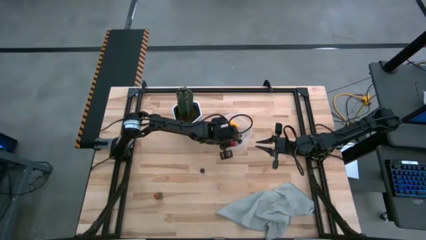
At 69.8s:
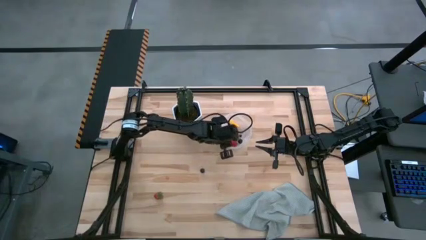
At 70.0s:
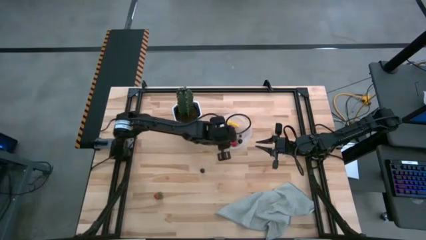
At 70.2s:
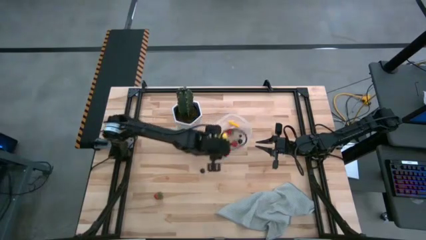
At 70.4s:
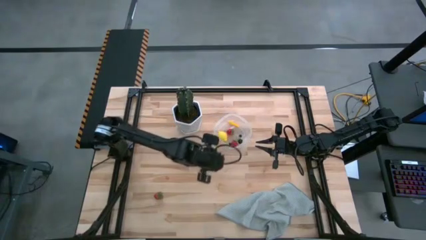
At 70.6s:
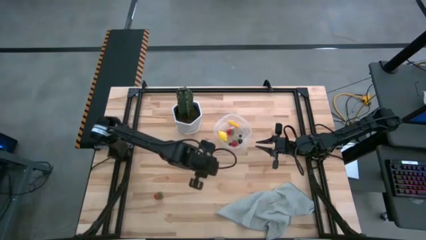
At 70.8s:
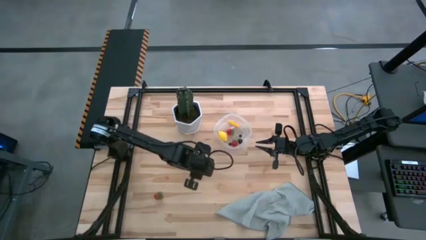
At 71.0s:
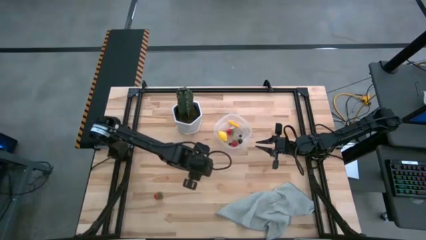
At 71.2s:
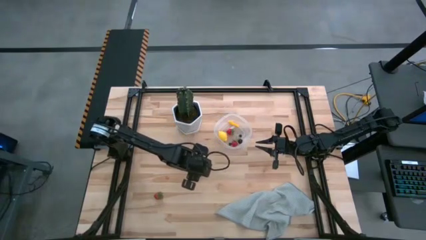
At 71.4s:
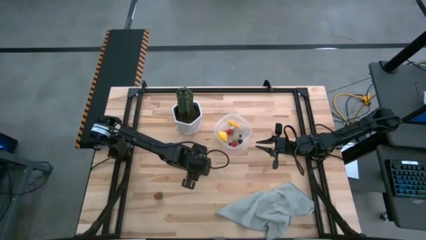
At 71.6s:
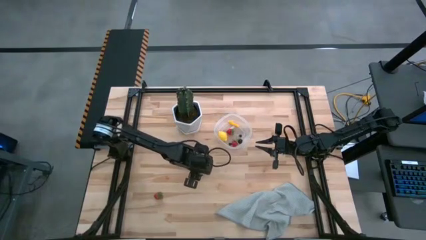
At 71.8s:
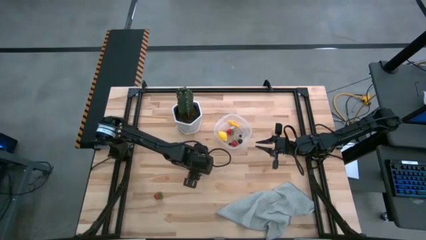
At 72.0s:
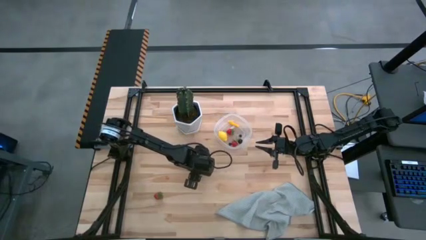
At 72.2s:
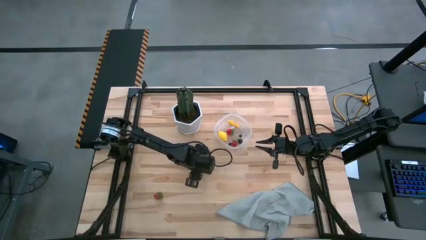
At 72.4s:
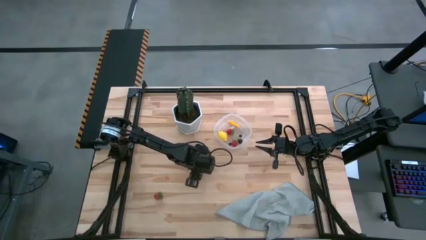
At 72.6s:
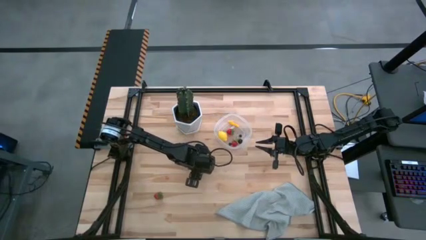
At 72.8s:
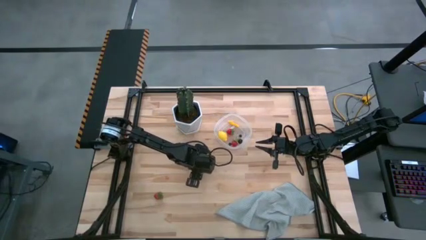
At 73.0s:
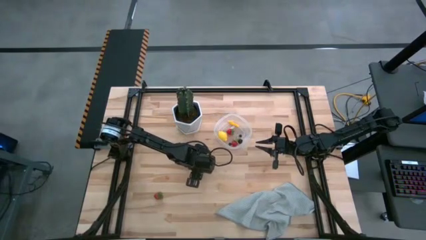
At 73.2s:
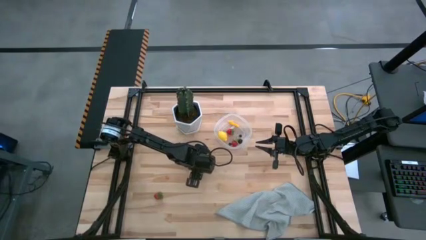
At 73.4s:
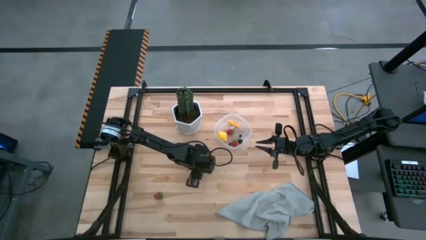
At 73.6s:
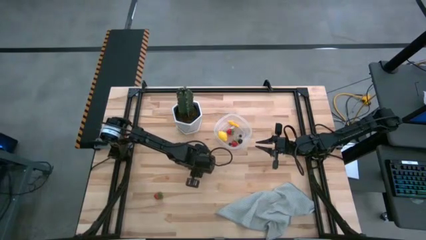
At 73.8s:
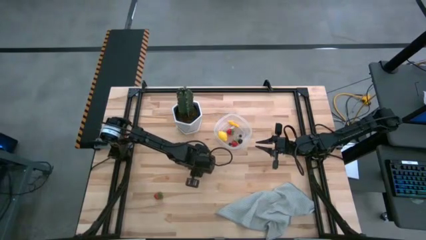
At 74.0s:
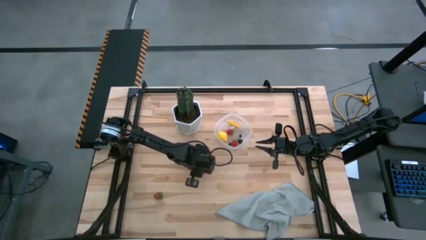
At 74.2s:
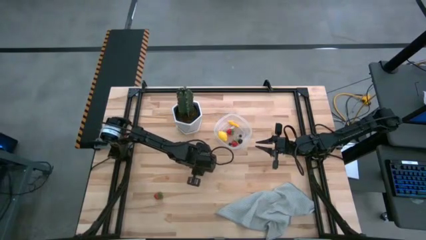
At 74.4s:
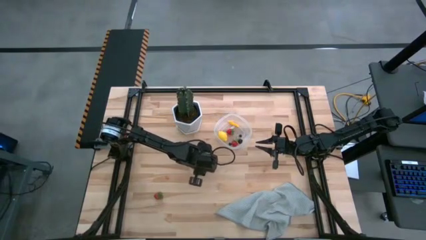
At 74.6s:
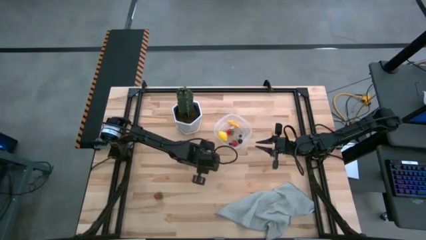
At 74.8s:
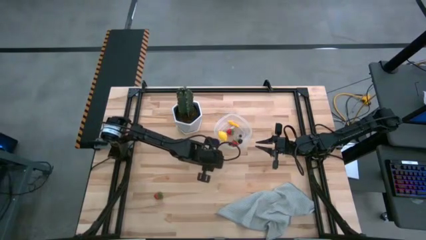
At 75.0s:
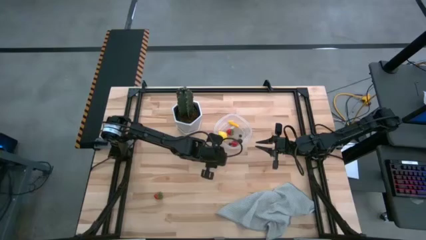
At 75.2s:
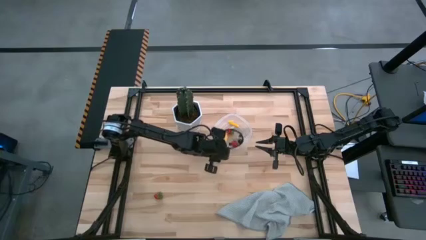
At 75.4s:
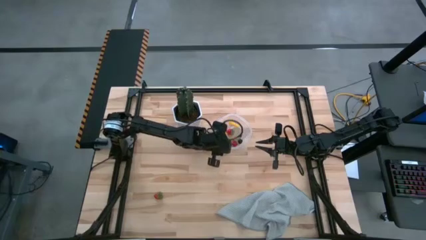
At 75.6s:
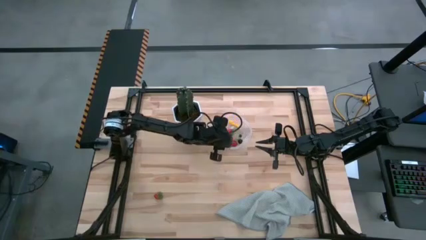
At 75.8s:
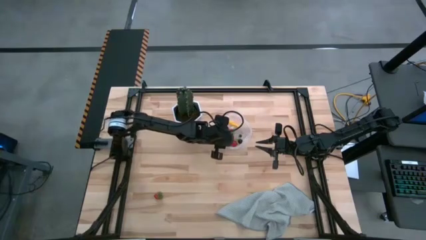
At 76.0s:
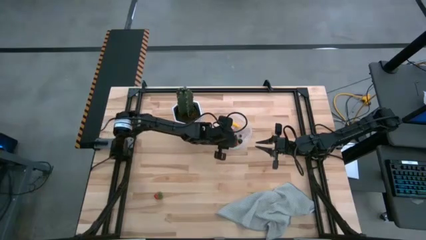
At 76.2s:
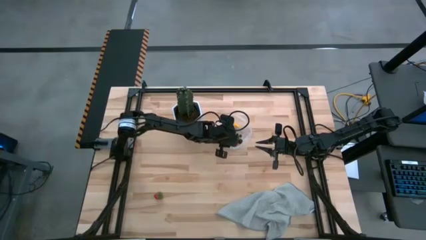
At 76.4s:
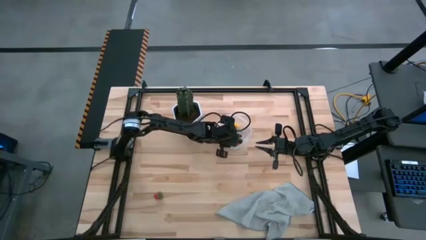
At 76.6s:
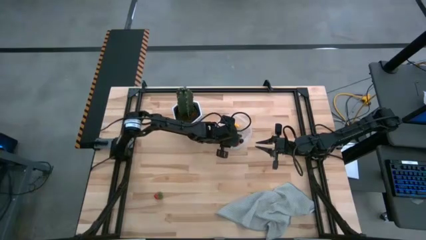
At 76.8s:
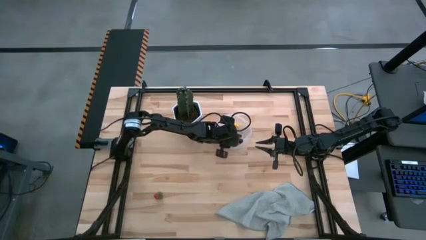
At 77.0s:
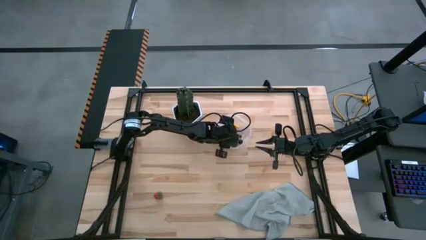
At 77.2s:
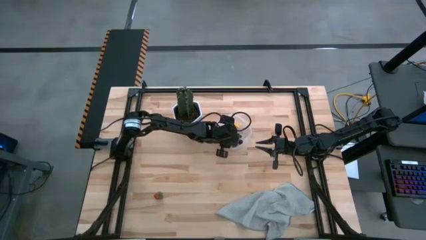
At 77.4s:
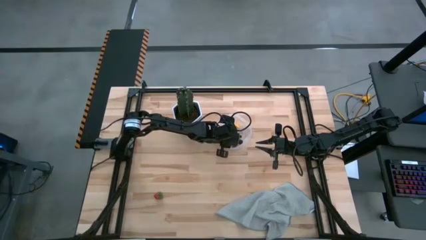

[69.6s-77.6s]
Task: Pick and placing Produce into tupperware
Put the blackberry into the transparent container

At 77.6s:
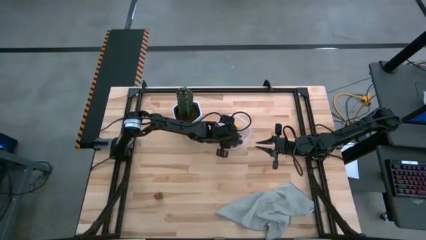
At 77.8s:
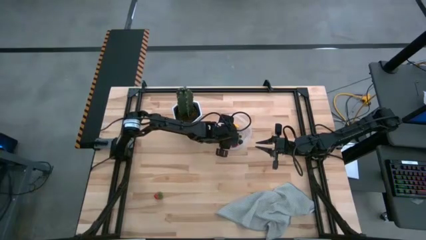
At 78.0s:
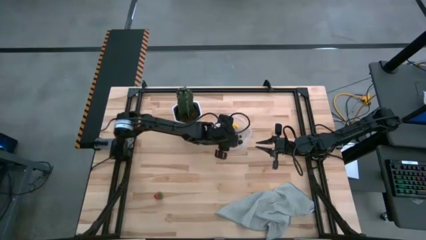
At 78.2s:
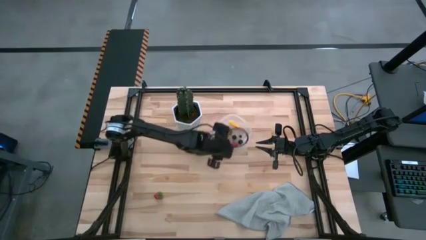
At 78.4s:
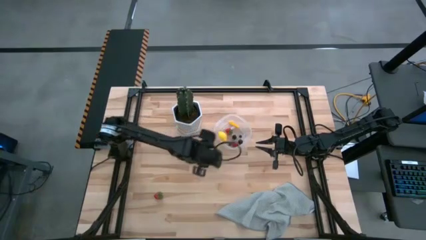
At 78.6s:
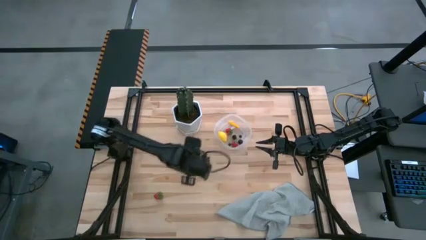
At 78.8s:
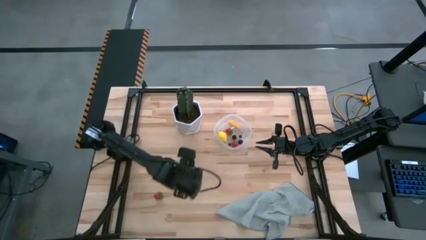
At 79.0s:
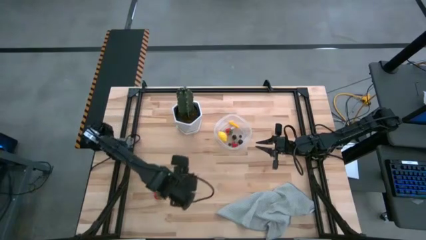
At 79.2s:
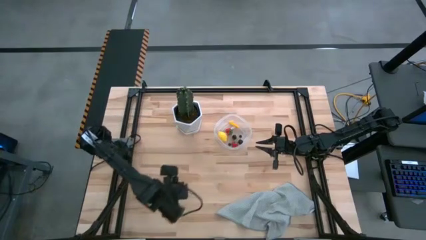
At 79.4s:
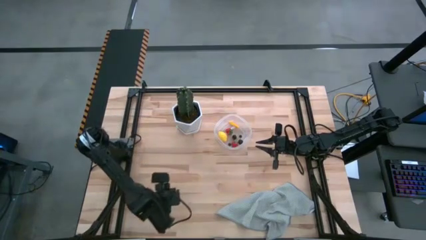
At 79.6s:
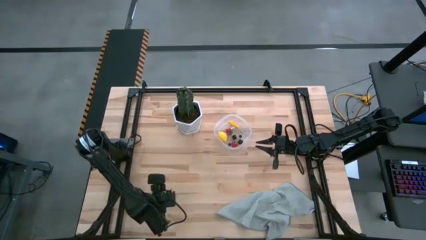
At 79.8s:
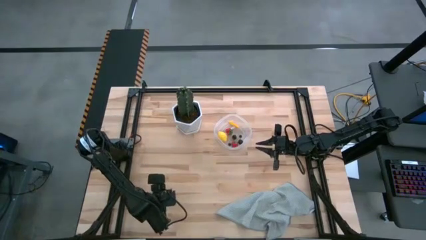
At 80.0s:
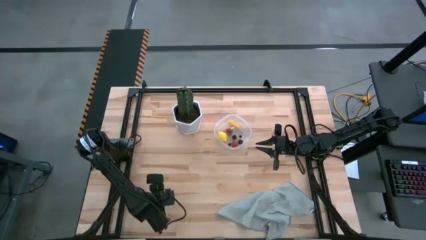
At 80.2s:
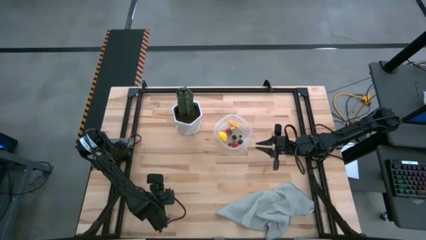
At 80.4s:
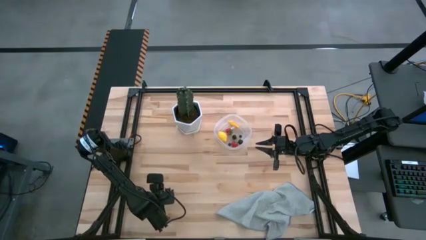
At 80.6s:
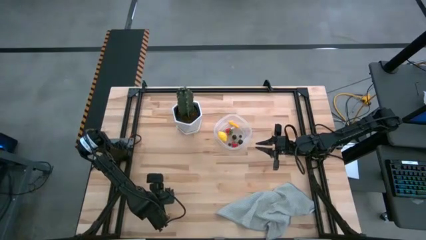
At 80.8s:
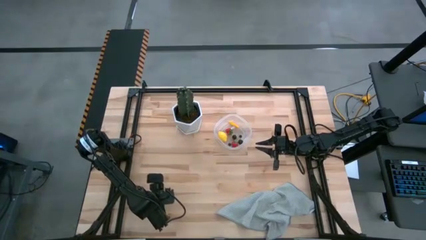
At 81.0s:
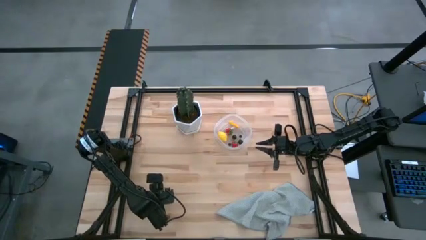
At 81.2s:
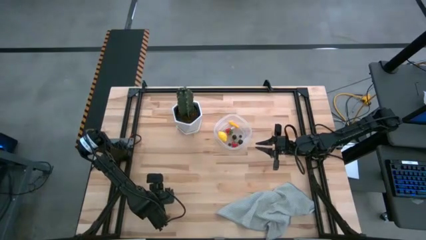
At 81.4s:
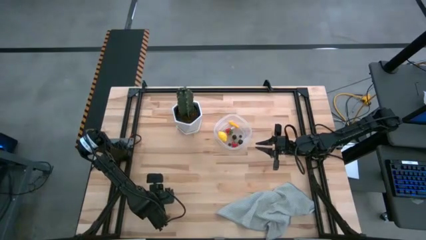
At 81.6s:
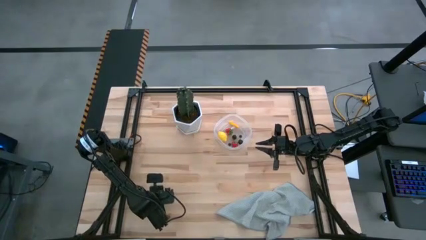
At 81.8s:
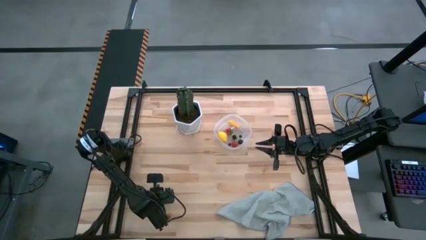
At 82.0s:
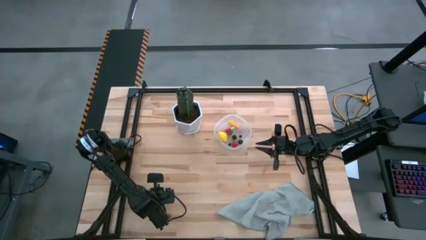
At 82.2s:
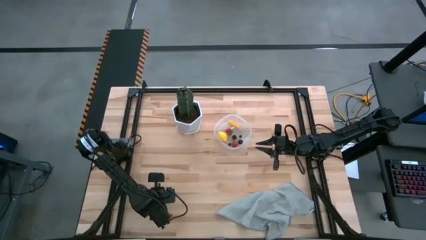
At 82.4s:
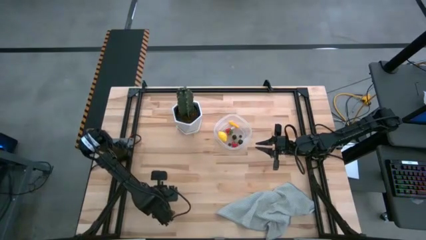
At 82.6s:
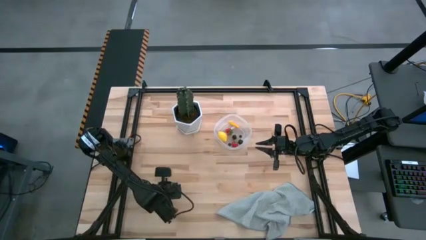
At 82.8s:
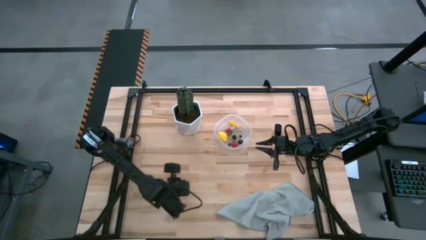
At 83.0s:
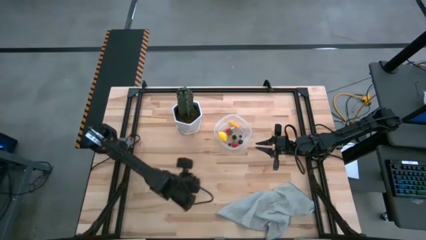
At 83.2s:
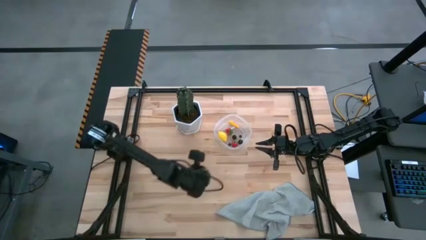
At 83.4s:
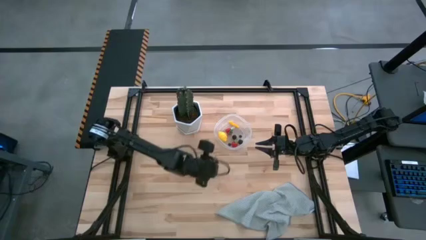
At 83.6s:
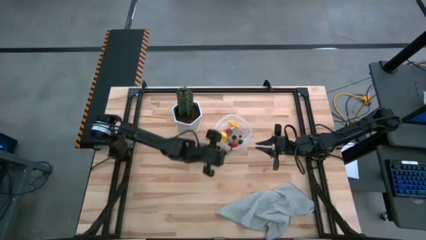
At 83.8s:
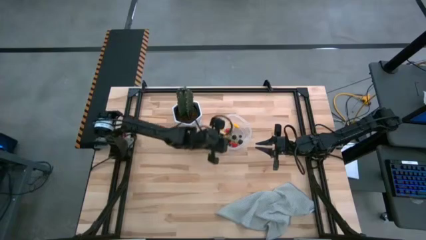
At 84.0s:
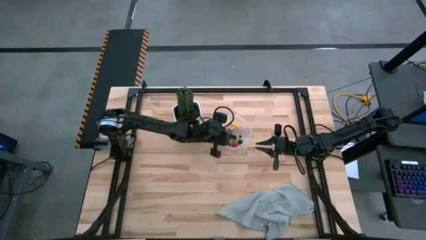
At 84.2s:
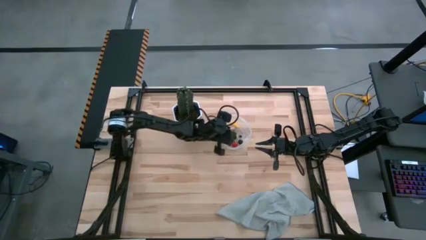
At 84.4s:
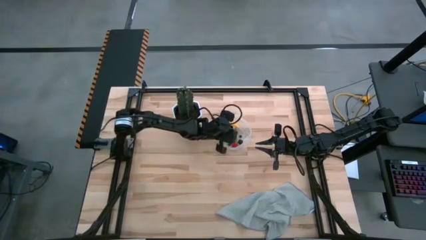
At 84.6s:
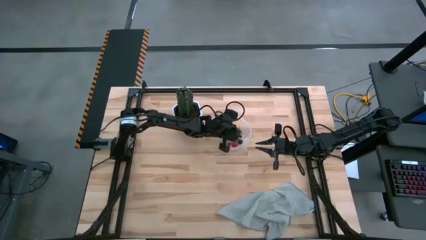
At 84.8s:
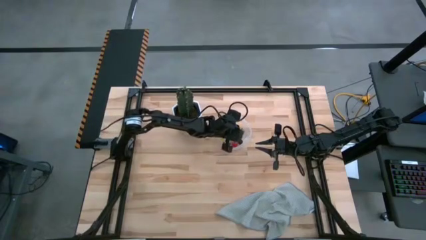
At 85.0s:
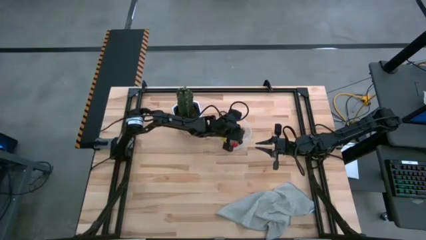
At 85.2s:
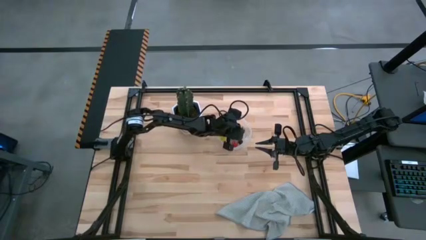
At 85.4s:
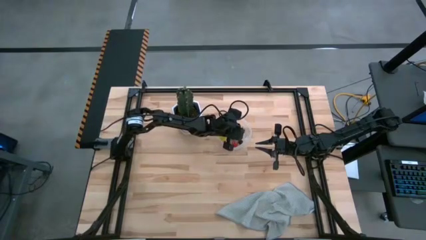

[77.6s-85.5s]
Put the red strawberry into the transparent container

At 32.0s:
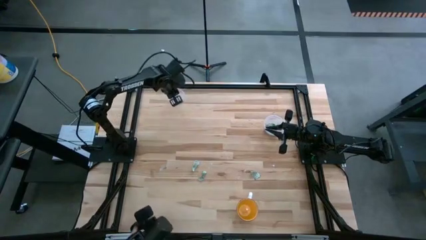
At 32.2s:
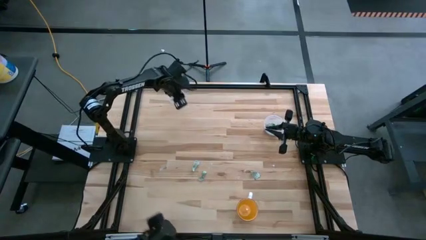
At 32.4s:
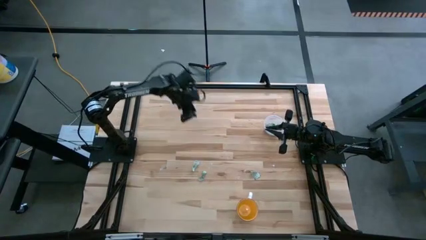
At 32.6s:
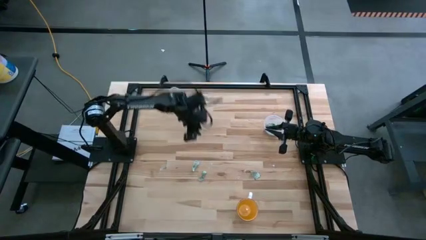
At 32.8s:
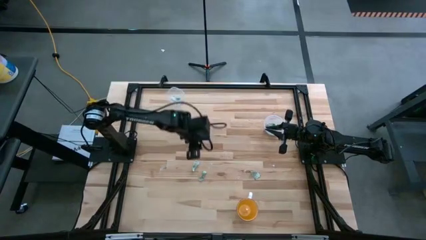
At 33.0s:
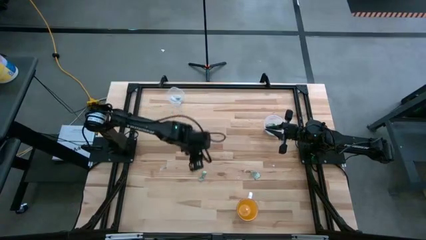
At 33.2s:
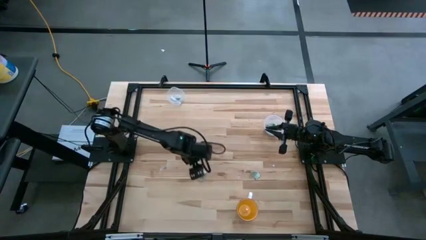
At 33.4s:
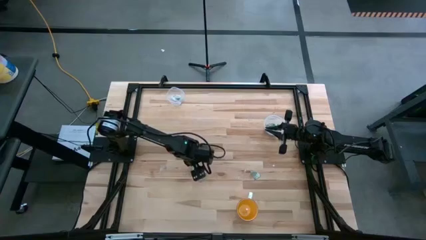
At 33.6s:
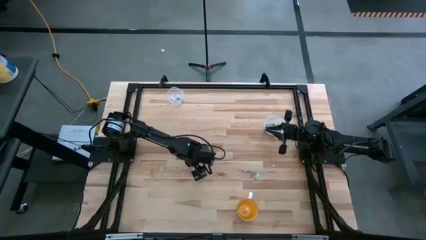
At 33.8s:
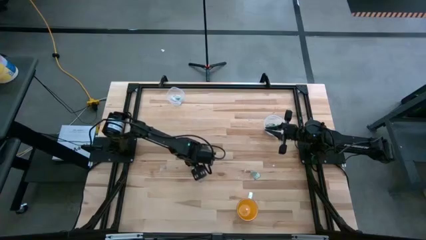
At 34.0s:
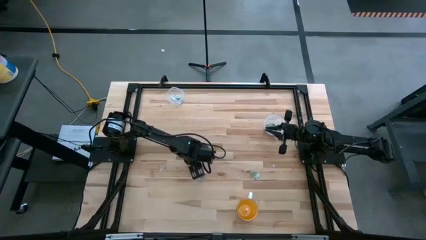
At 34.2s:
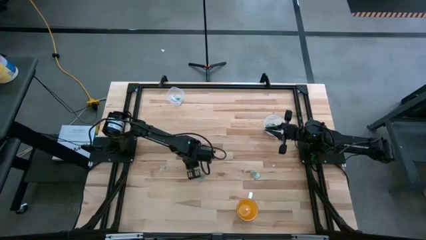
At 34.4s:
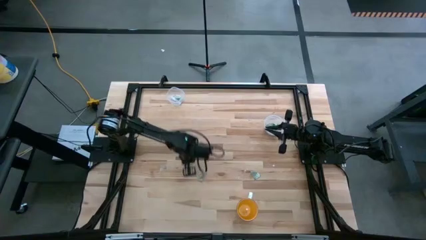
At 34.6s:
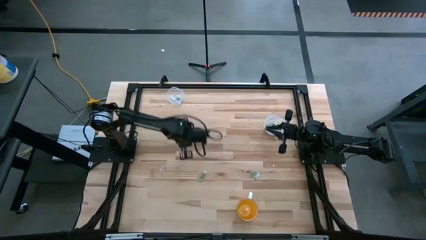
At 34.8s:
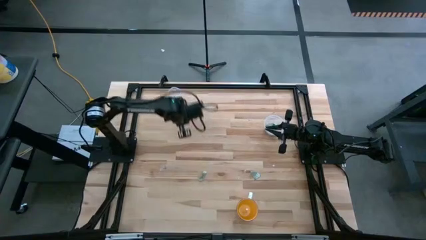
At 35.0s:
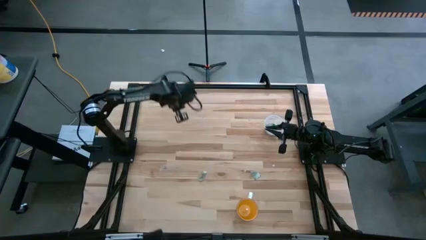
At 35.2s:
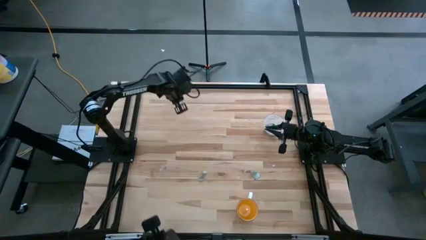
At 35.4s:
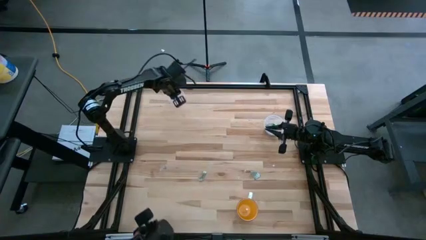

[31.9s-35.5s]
Task: Pick and place items into bin
Put the stevia packet into the top transparent bin
